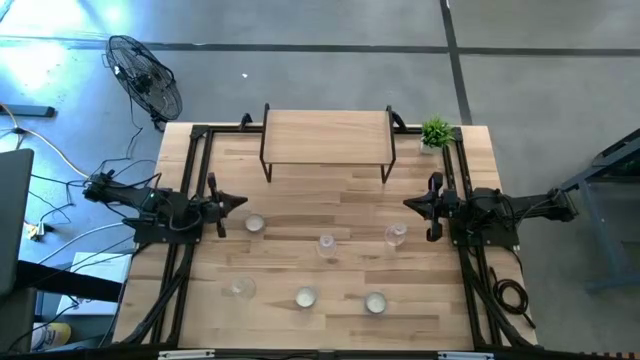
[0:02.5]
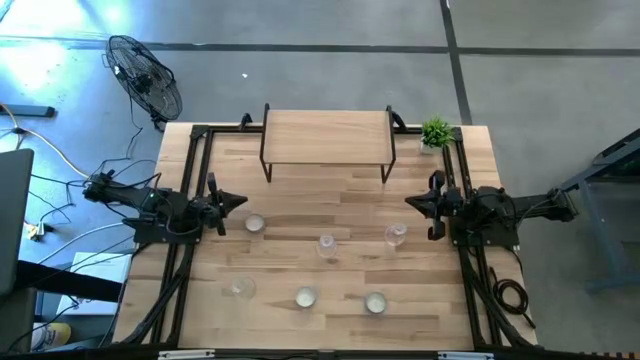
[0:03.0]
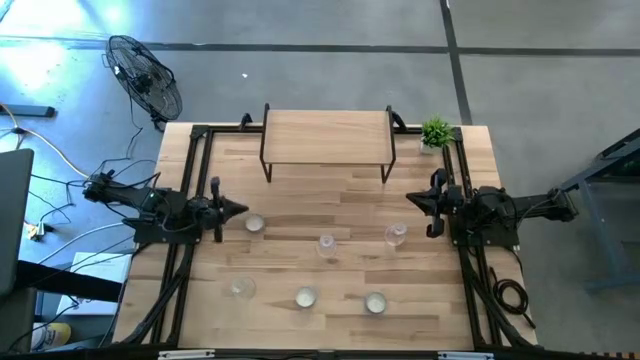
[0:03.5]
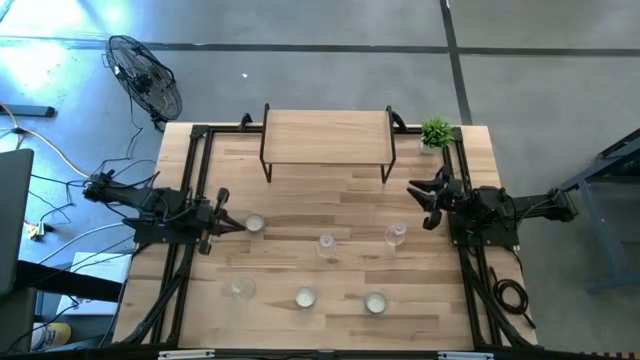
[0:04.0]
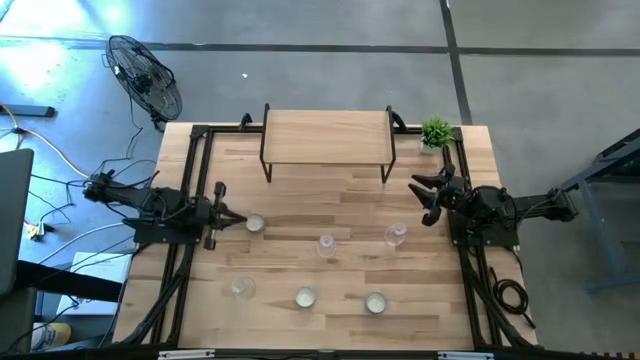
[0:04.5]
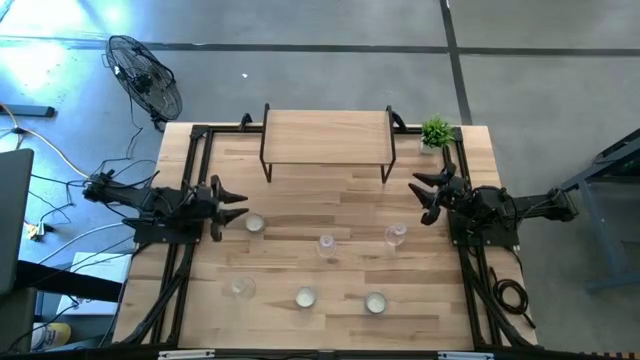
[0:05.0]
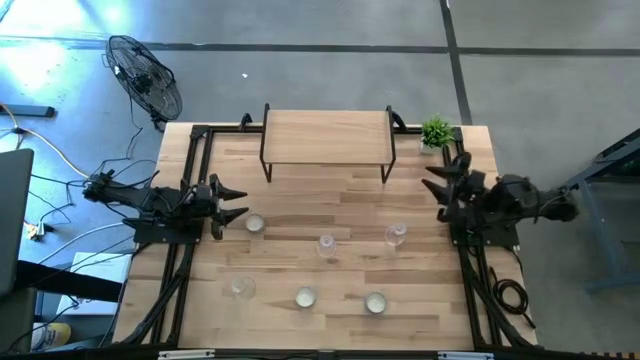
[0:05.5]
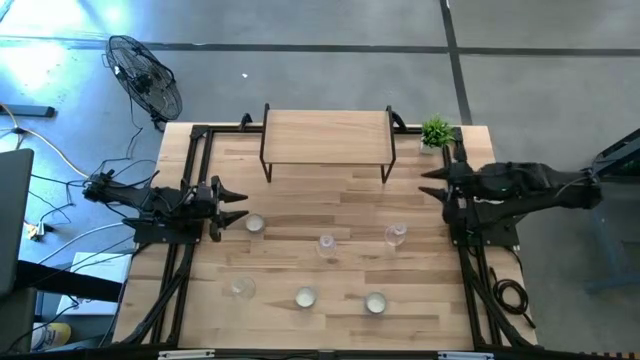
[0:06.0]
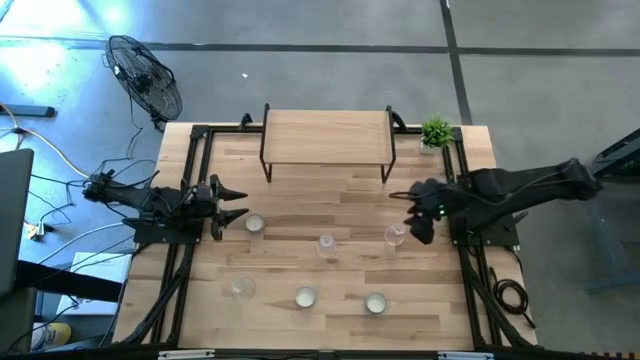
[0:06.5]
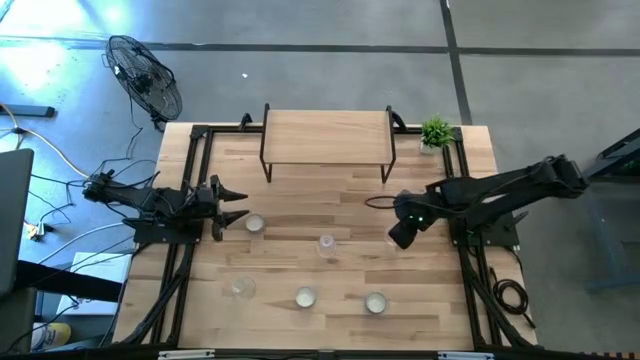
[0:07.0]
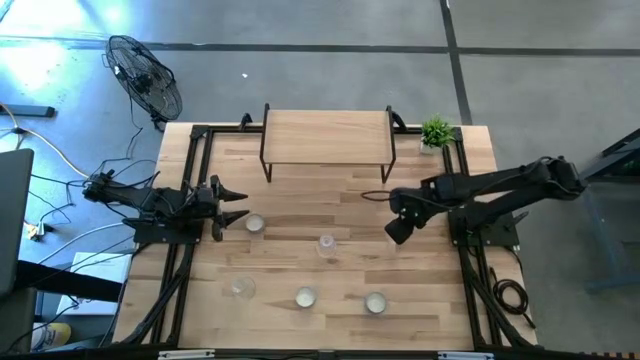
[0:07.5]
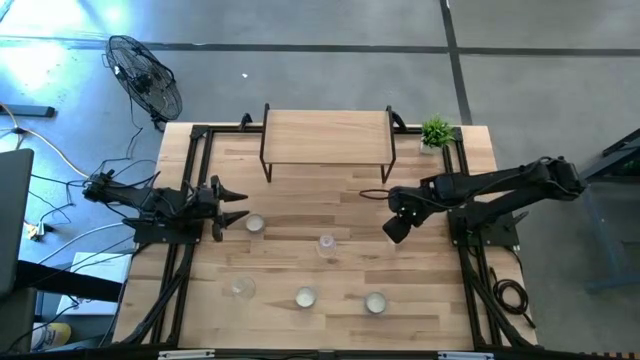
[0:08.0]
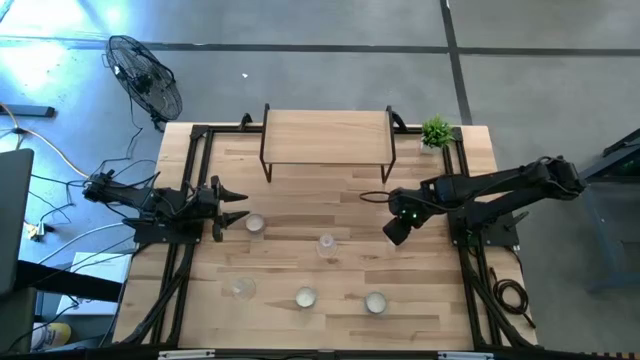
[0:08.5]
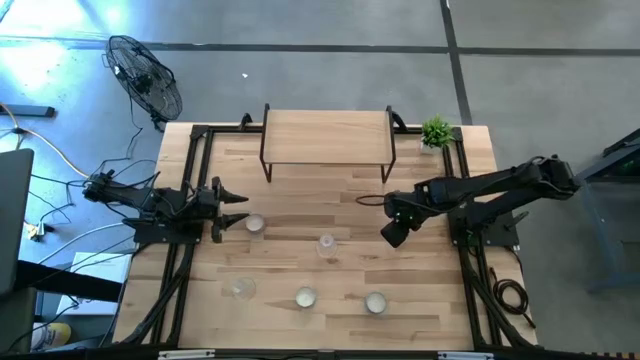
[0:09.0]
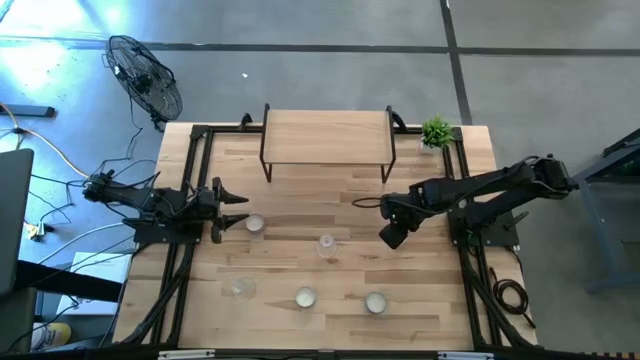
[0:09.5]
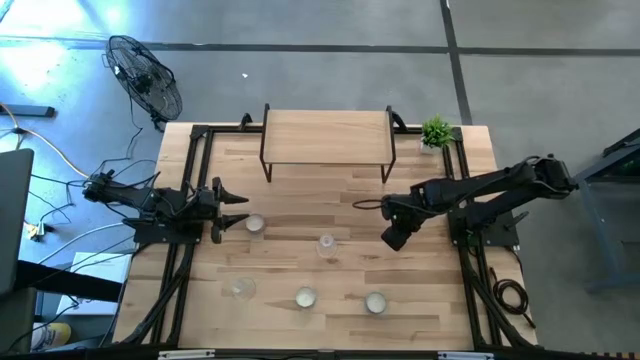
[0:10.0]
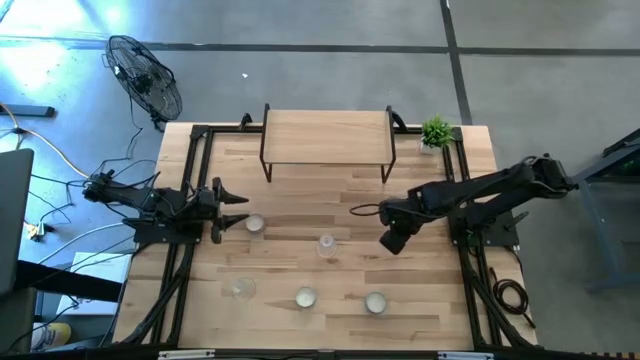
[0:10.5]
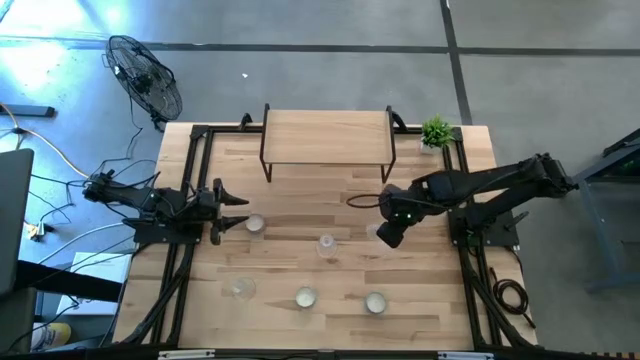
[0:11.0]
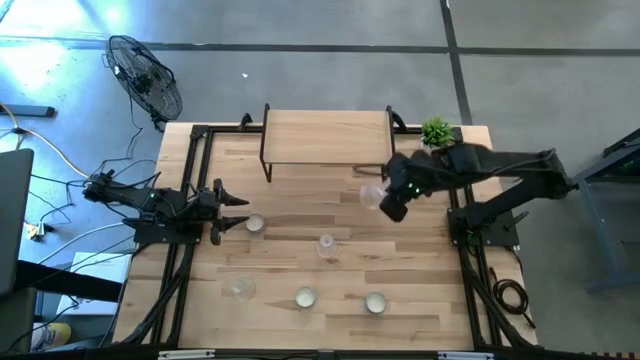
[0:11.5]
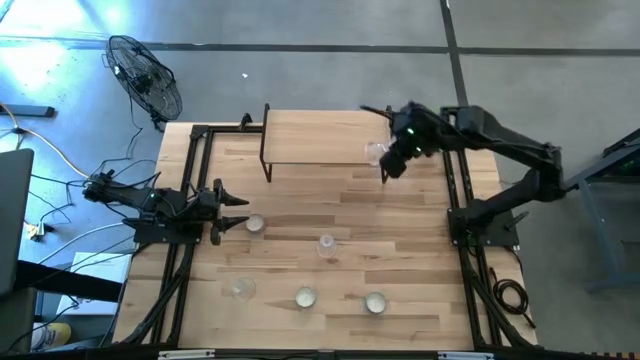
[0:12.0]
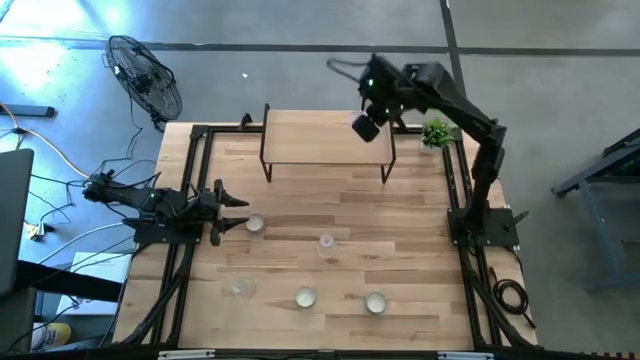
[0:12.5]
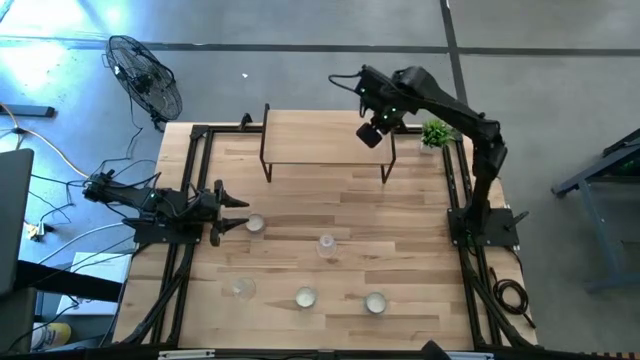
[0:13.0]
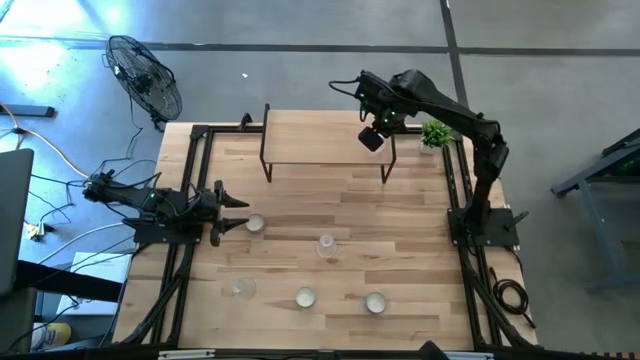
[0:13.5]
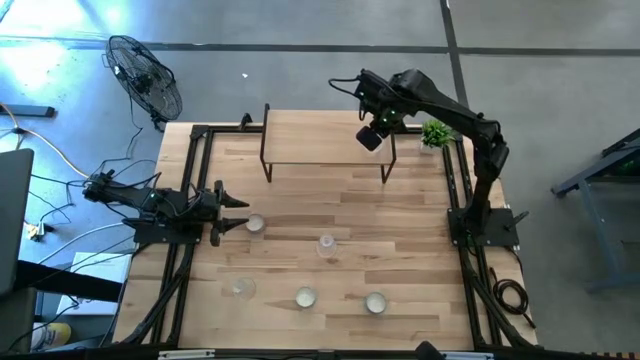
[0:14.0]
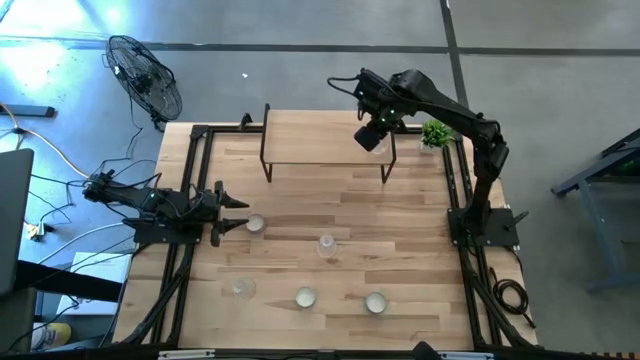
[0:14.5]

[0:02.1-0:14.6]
Task: Pick & Place candle stick holders
Put the top right transparent candle holder on the shelf

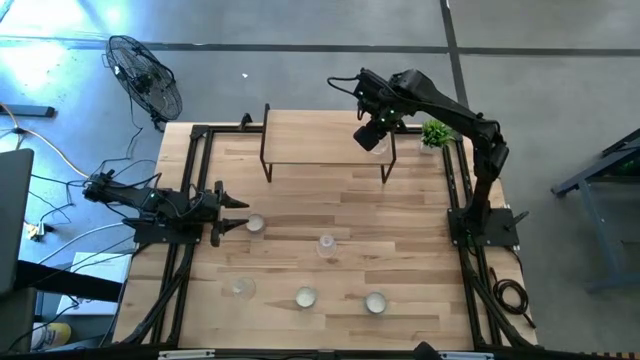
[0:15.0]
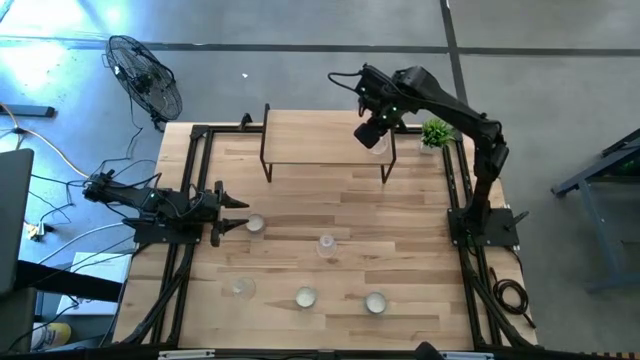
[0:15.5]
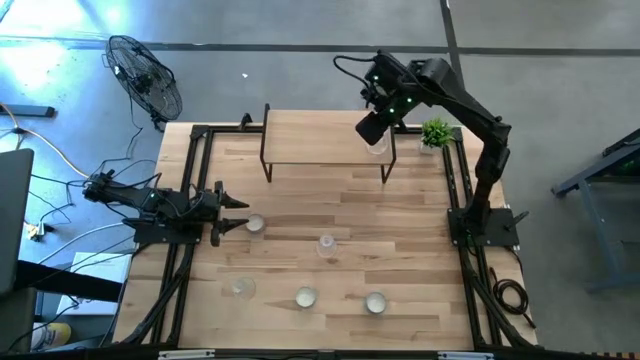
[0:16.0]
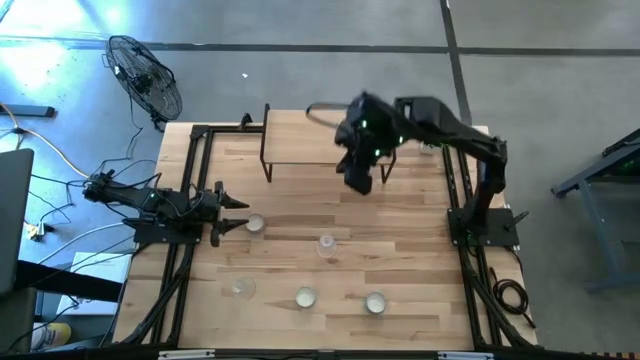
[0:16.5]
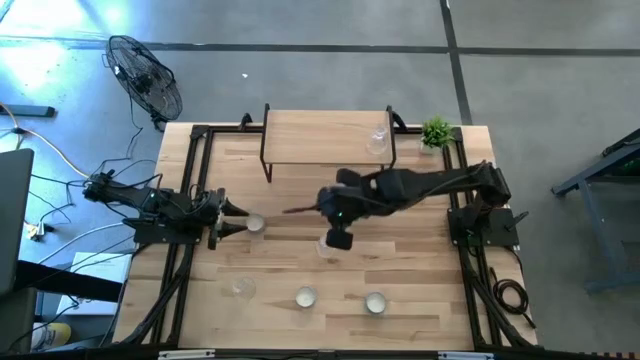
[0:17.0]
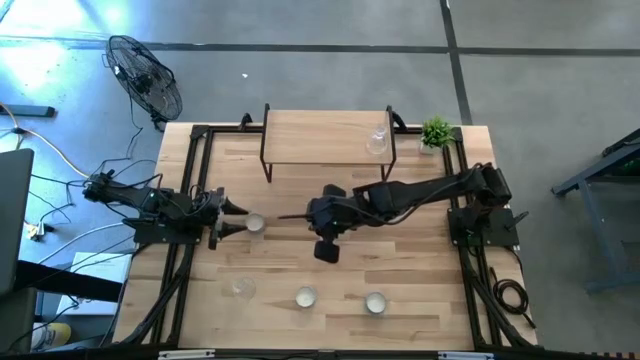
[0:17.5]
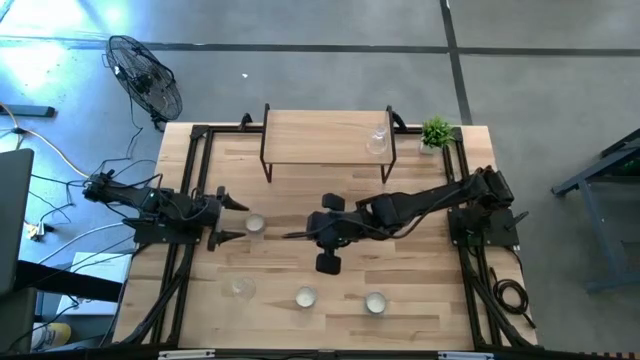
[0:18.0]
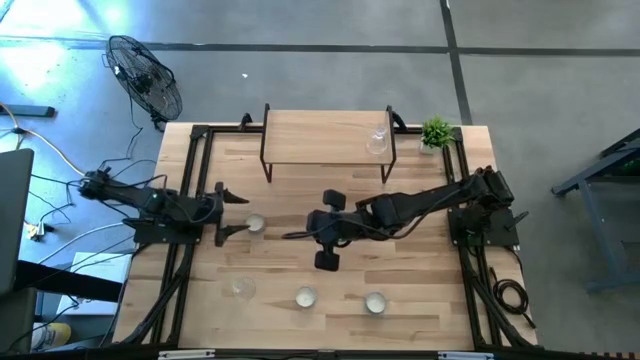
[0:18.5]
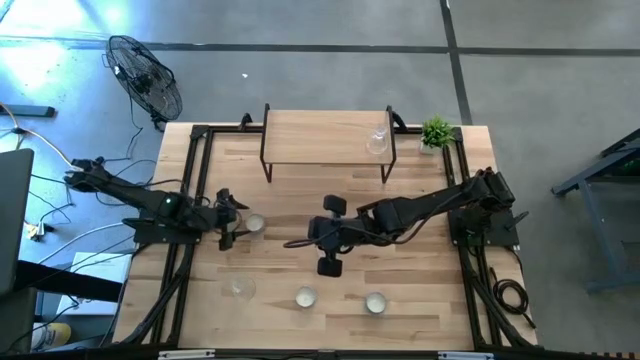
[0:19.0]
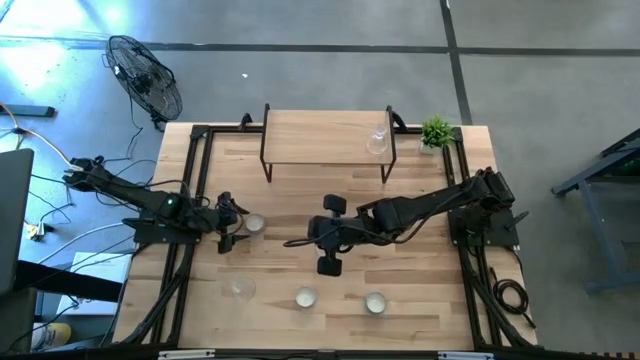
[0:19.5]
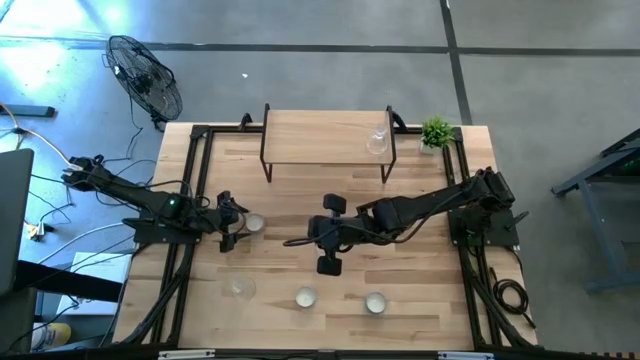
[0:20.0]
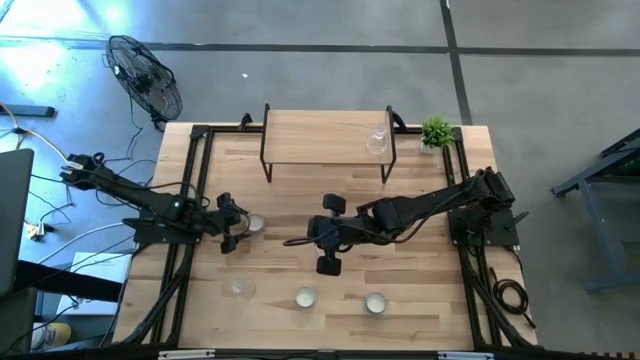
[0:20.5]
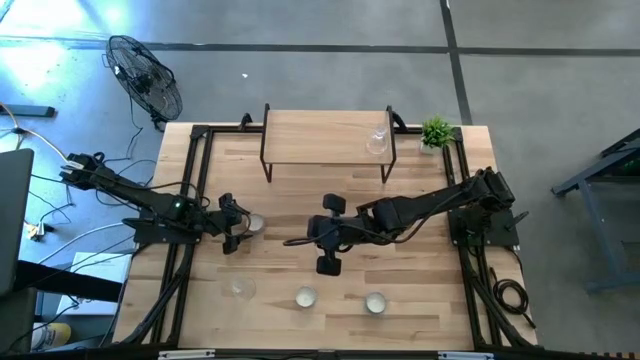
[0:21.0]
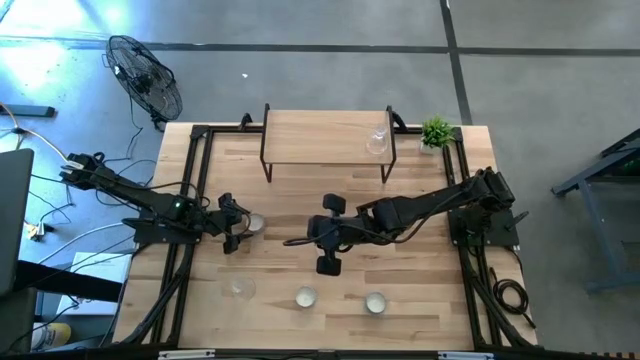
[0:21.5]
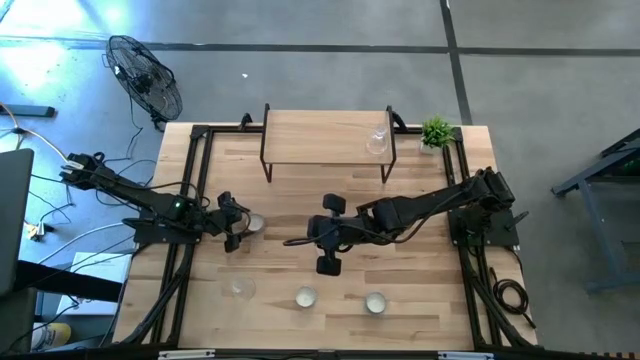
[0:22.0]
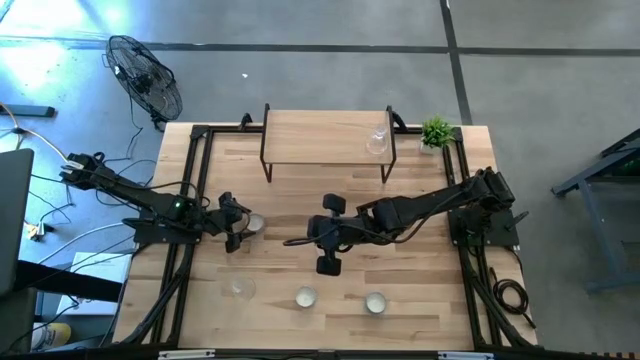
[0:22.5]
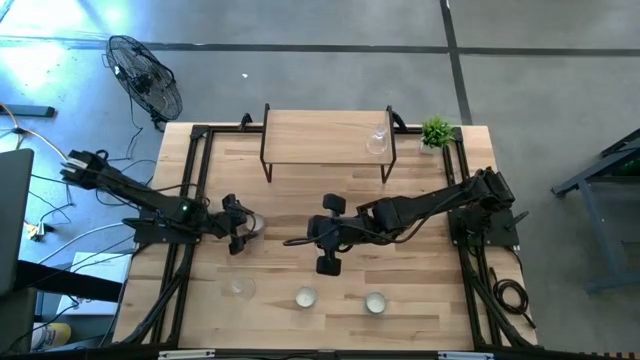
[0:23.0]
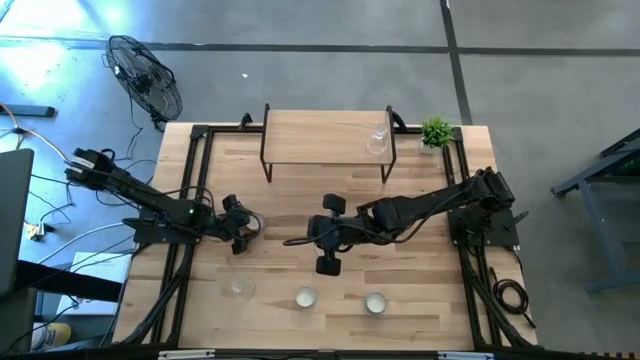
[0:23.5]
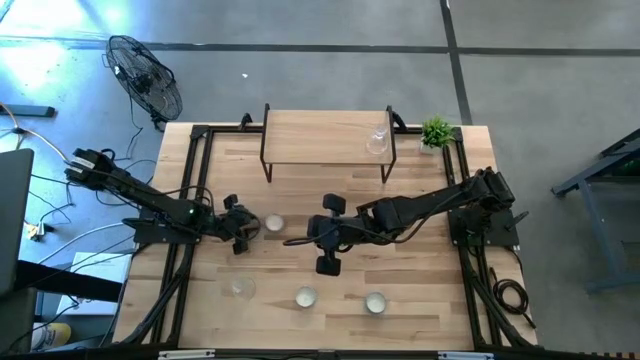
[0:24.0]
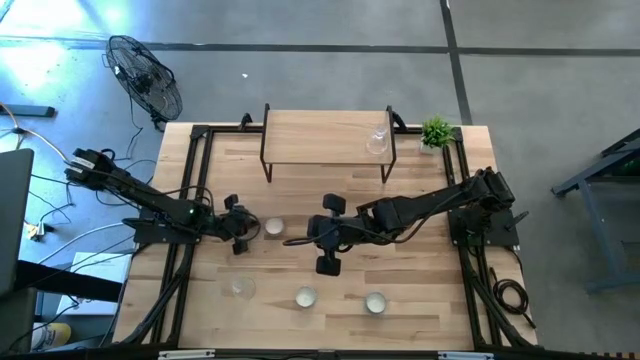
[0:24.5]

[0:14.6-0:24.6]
Put the purple patterned scented candle on the shelf
